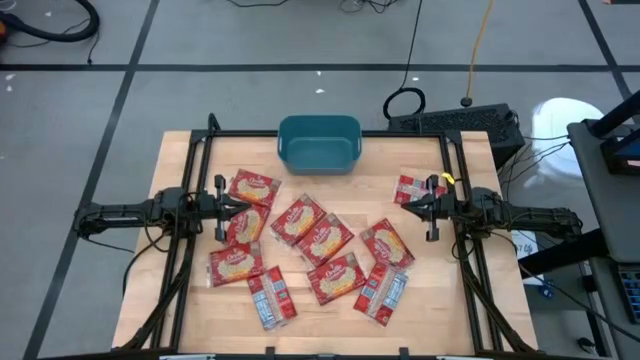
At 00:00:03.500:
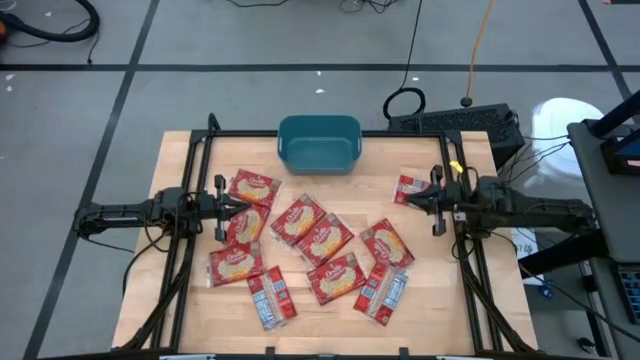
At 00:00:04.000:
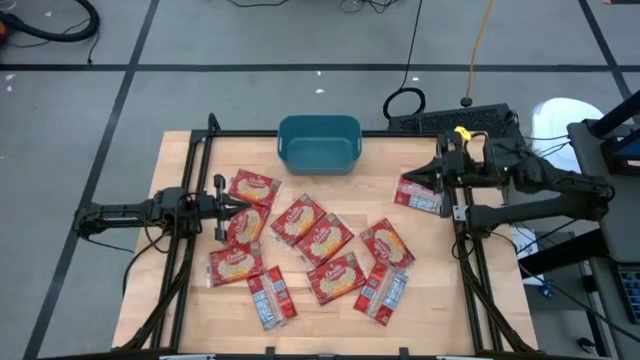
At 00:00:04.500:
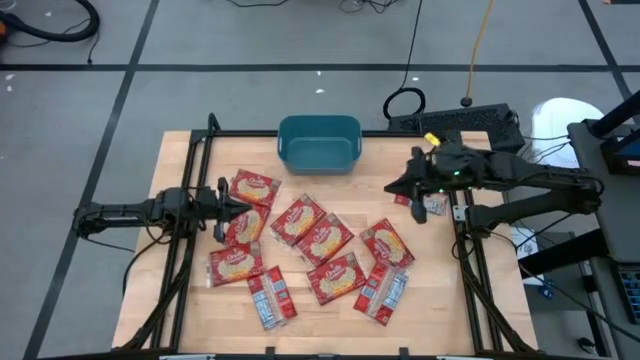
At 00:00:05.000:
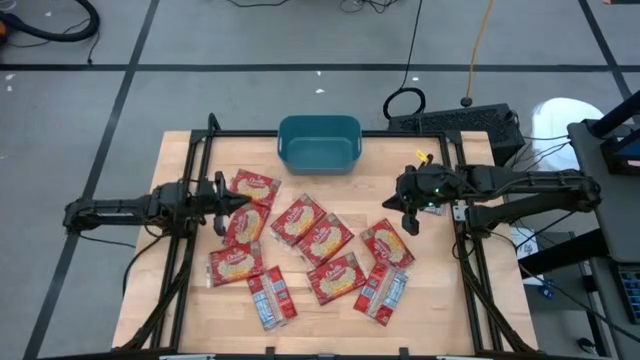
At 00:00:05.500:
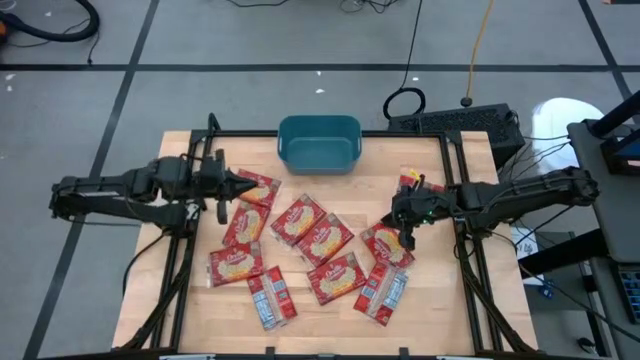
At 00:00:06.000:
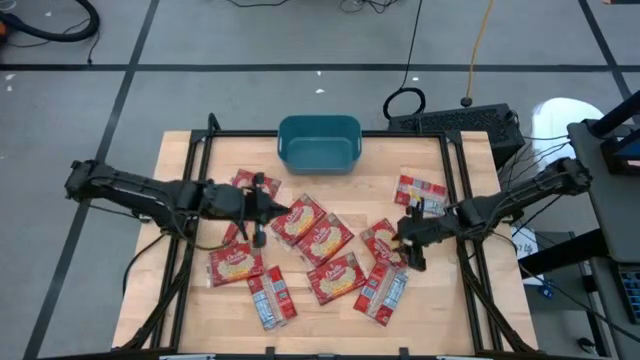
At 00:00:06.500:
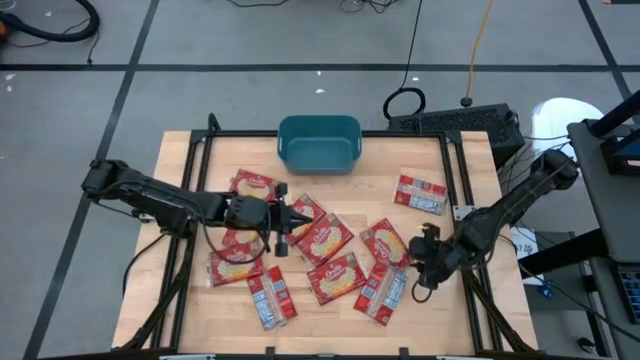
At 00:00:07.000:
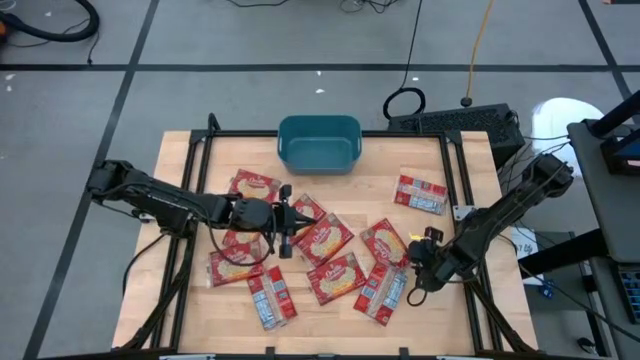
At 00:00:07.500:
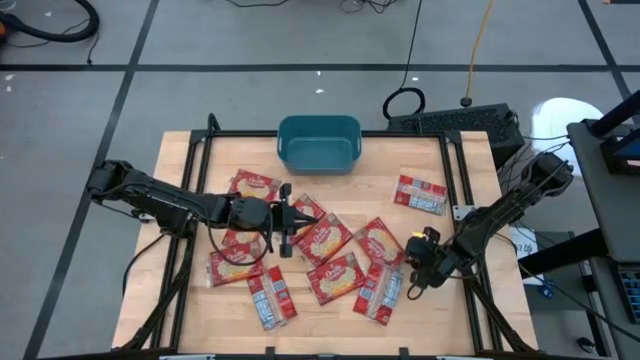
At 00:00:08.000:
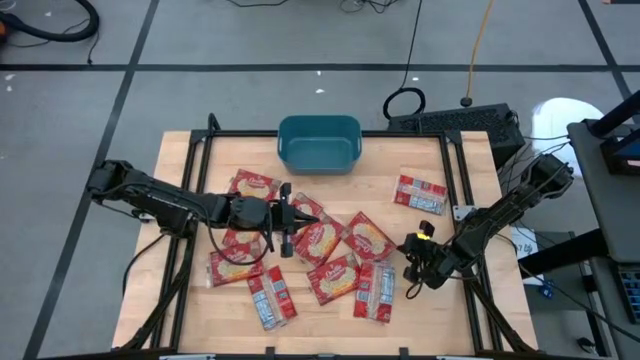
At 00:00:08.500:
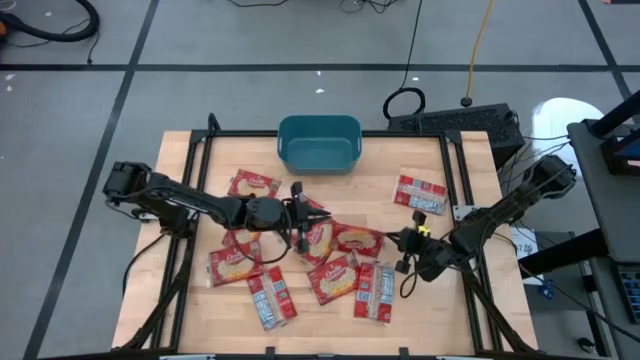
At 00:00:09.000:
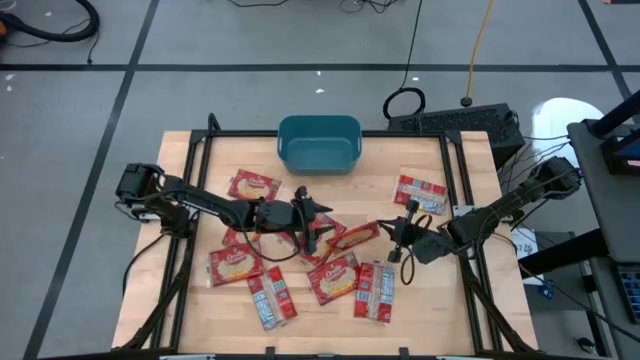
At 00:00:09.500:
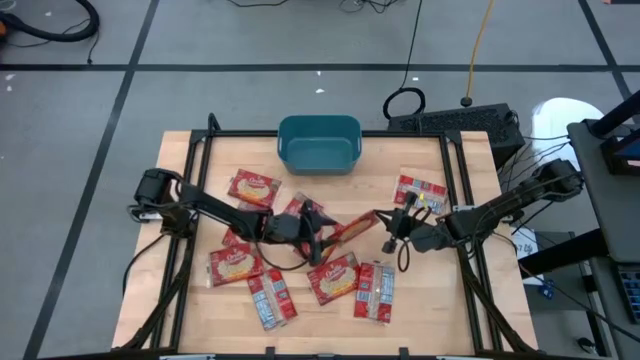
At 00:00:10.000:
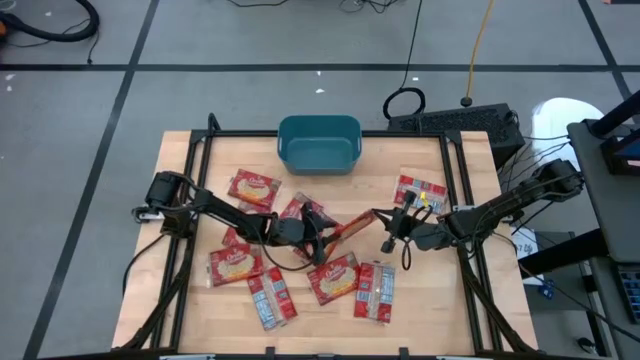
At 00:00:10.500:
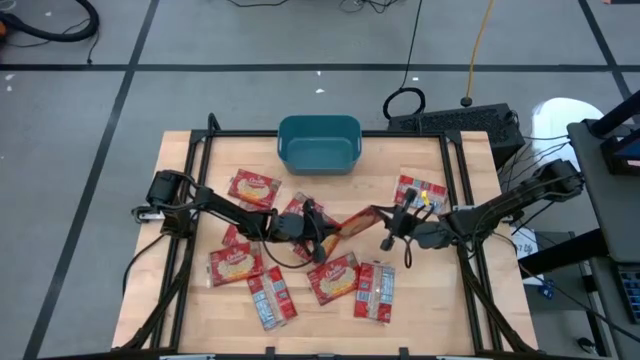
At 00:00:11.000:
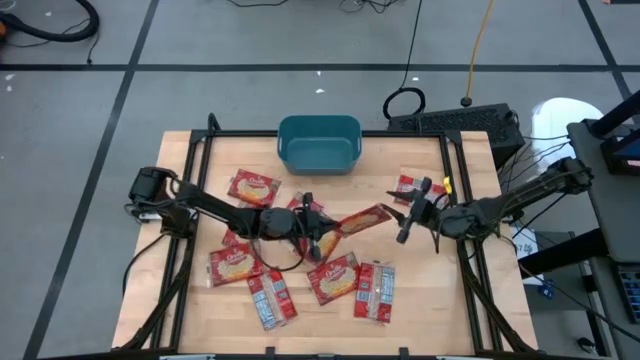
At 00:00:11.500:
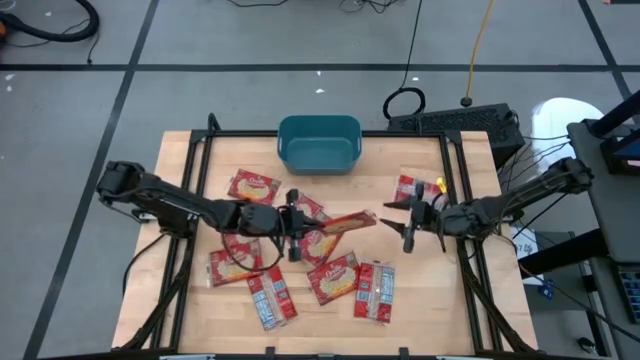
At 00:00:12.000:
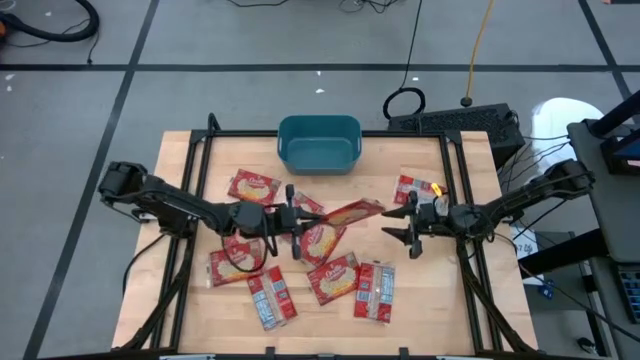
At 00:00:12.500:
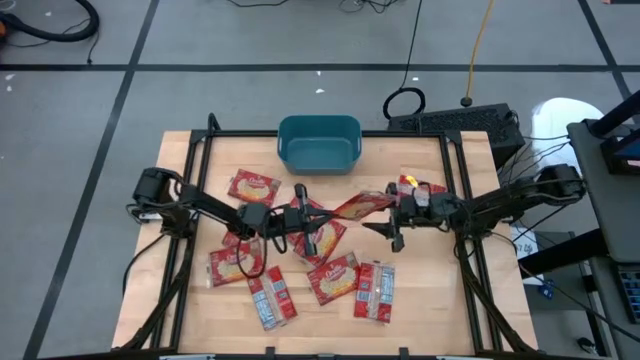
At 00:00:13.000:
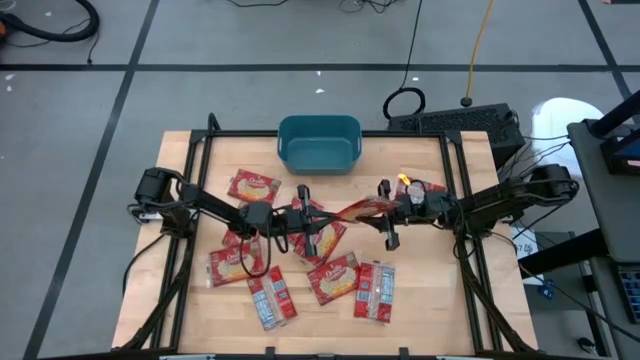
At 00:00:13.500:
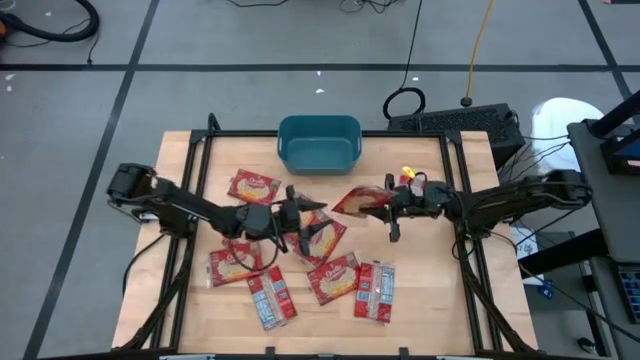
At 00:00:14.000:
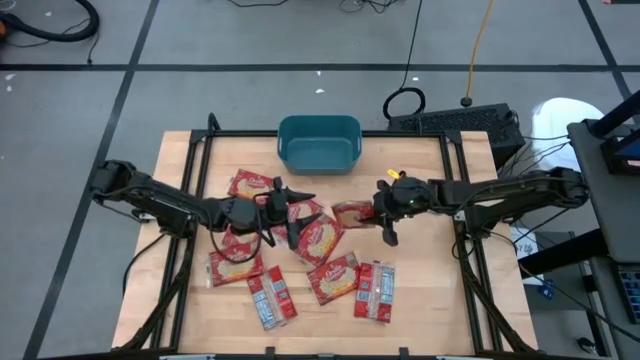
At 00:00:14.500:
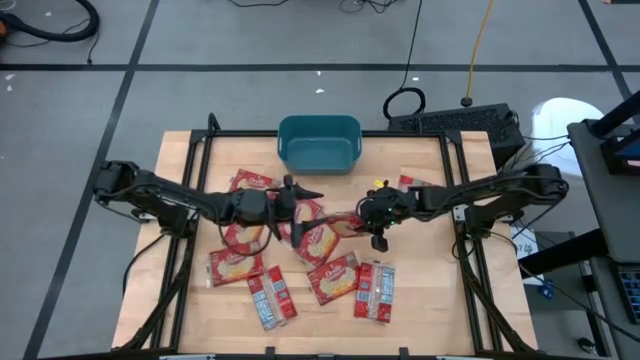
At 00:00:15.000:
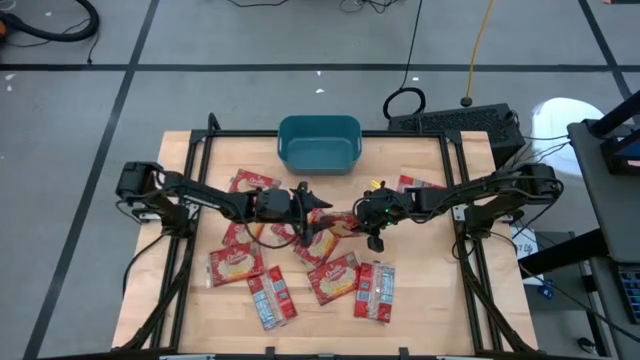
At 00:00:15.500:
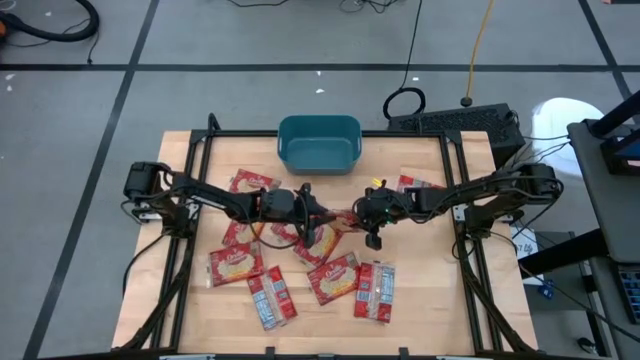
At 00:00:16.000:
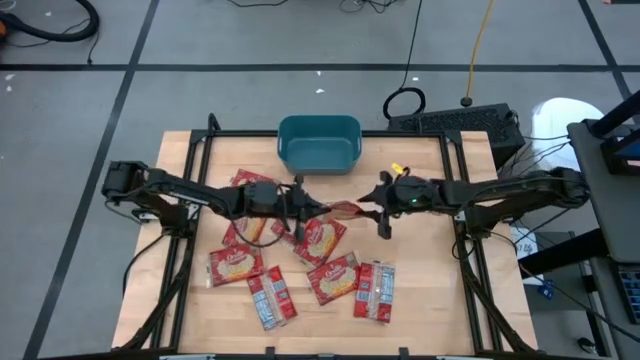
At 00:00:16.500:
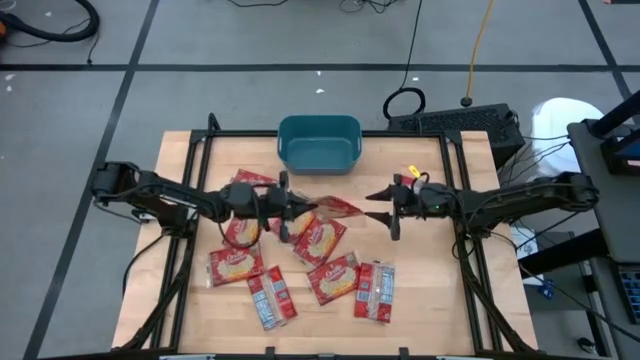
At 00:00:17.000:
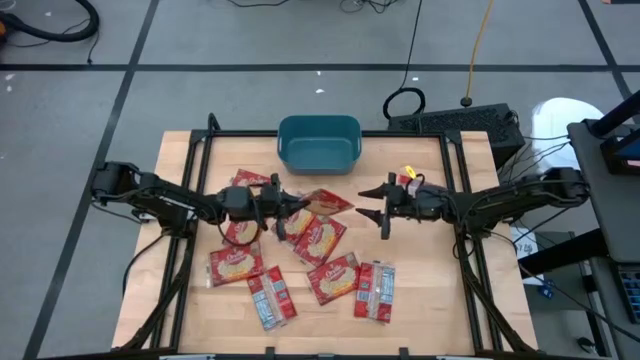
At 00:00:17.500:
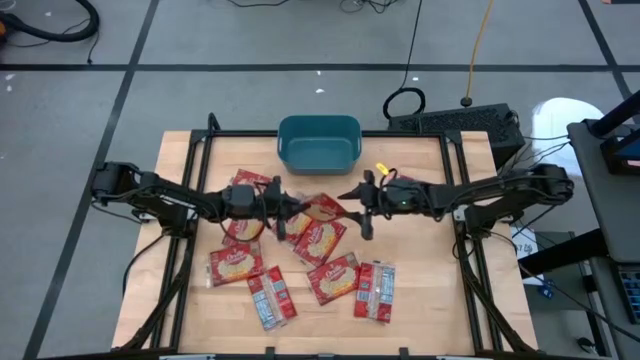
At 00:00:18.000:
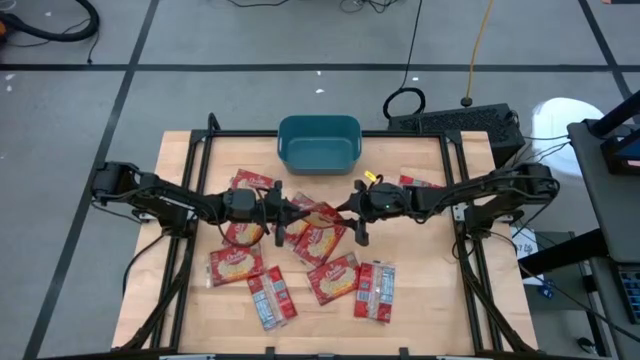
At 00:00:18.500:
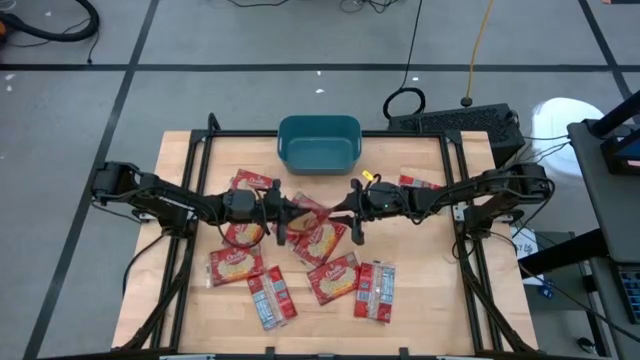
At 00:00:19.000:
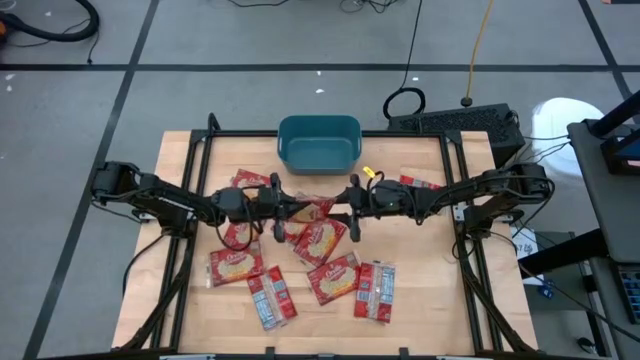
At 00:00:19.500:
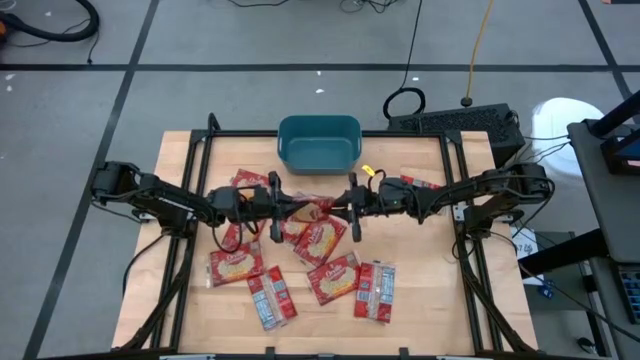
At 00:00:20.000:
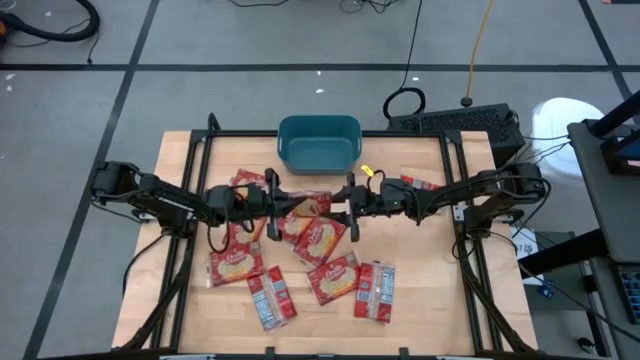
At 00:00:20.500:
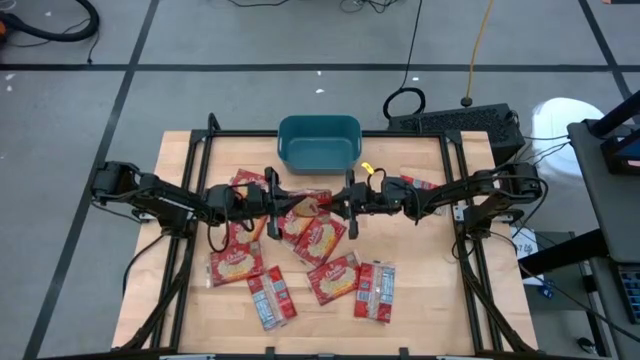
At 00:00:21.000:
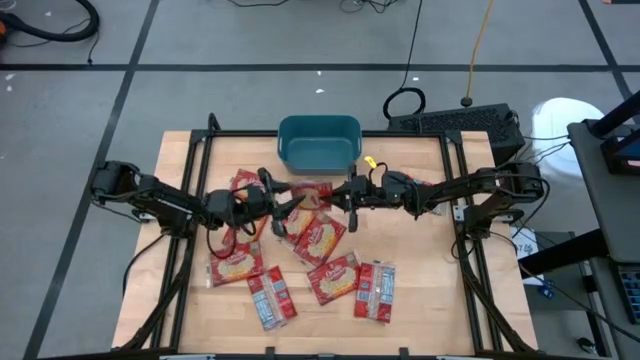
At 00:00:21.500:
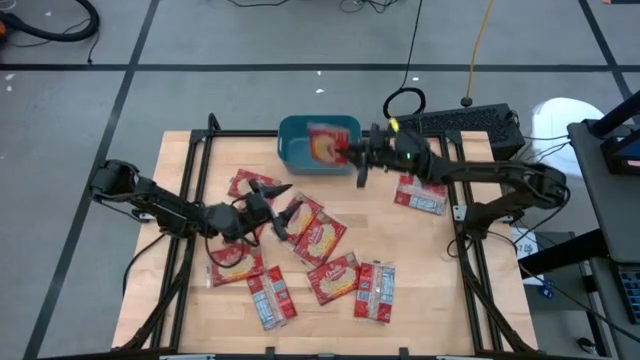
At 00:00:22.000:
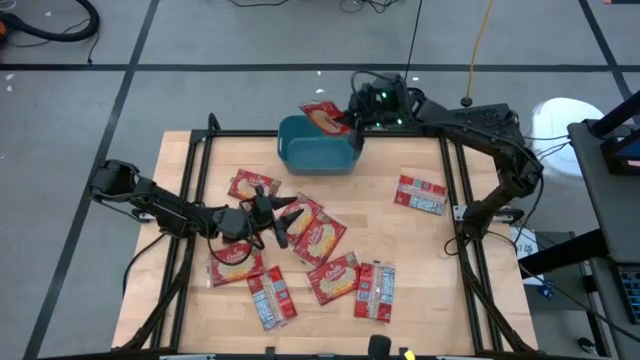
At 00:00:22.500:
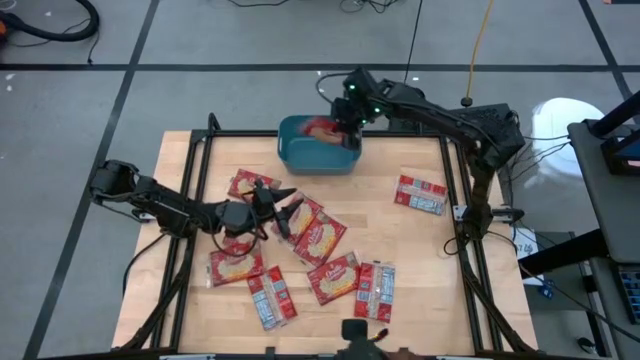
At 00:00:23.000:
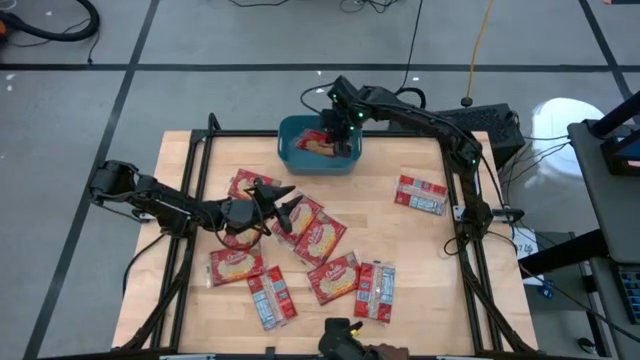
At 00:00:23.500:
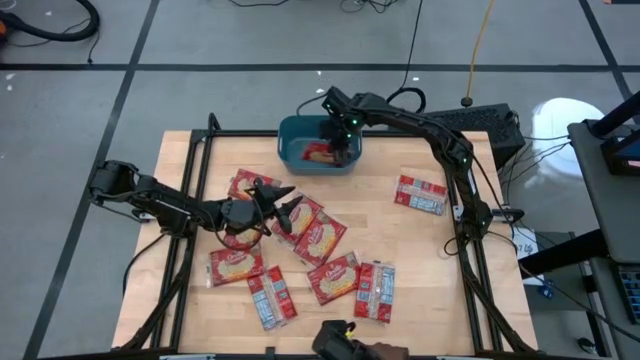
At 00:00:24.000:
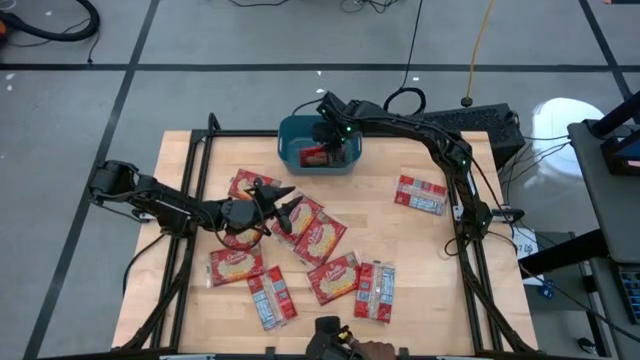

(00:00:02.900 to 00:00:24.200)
Task: Sort popcorn bags into baskets
Put the red popcorn bag into the blue bin
